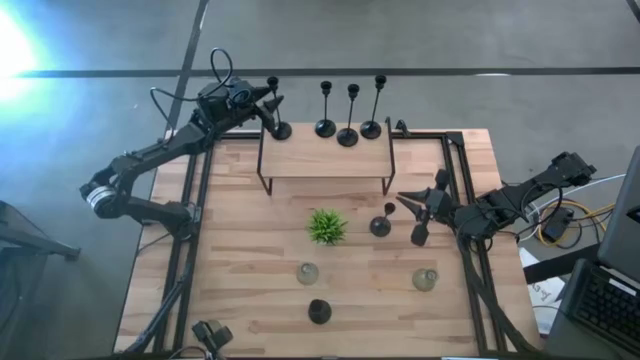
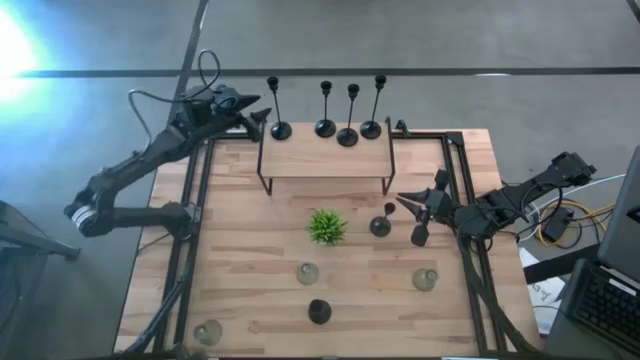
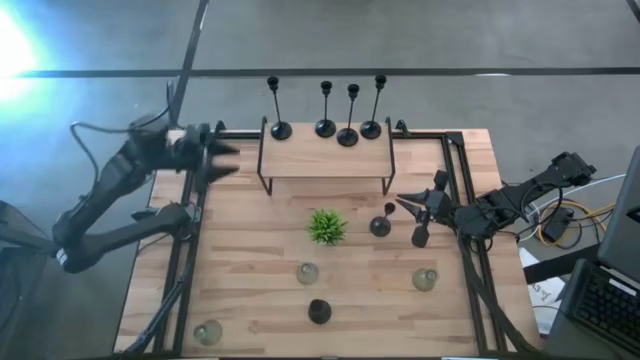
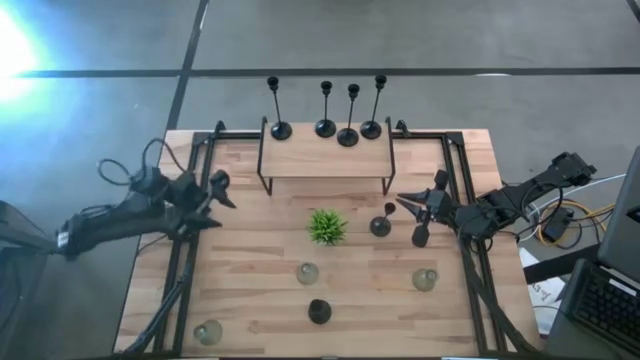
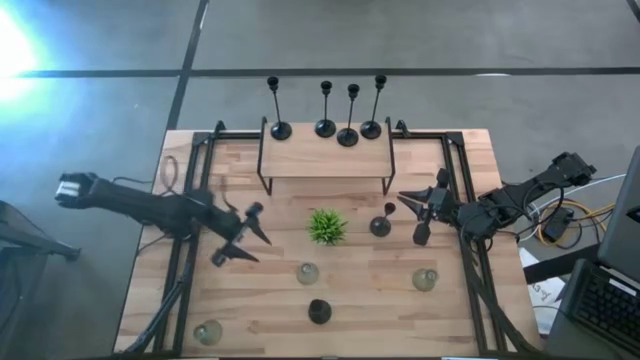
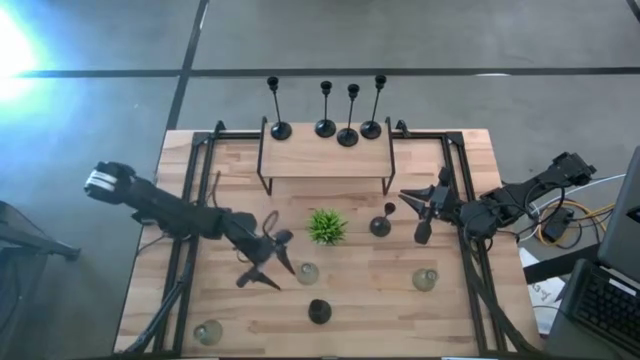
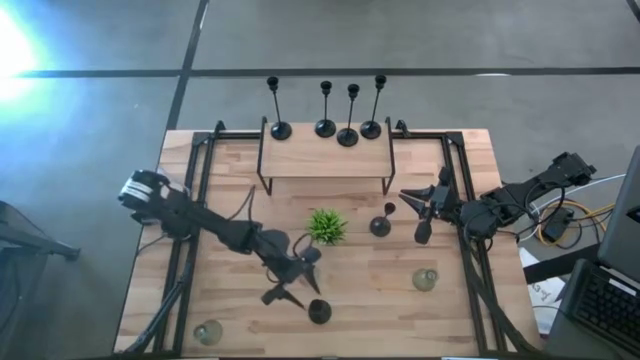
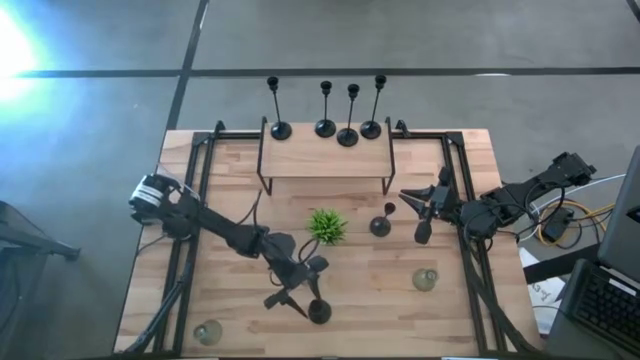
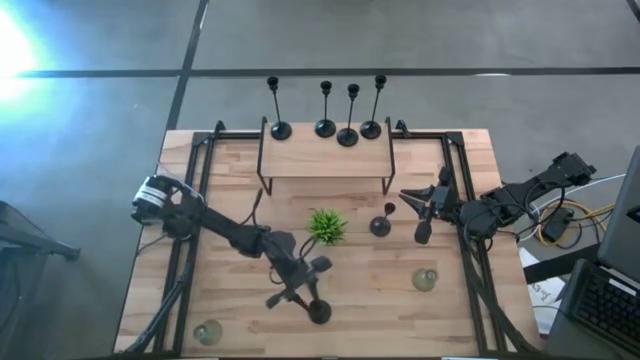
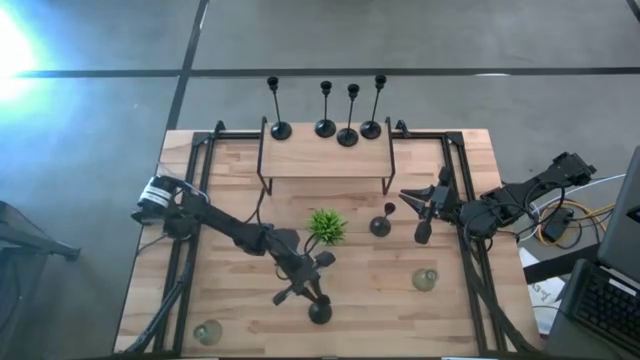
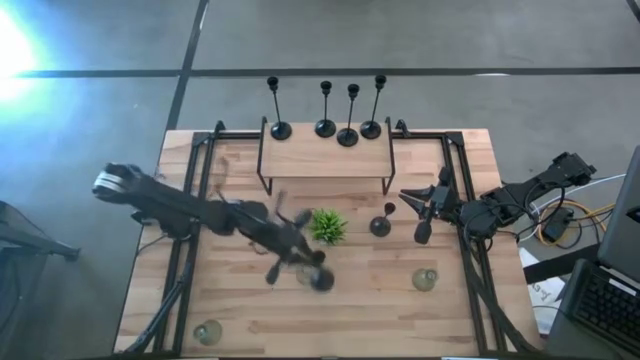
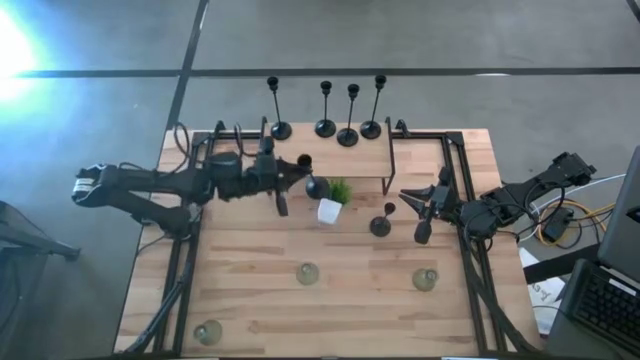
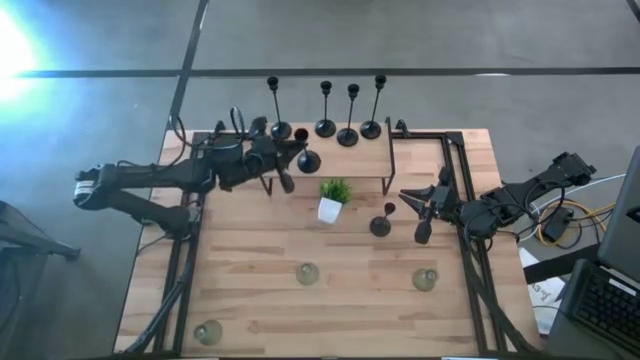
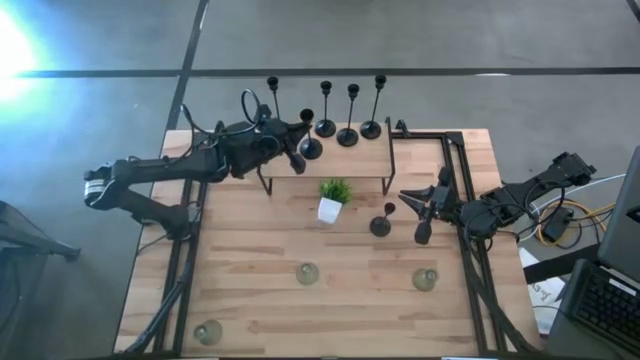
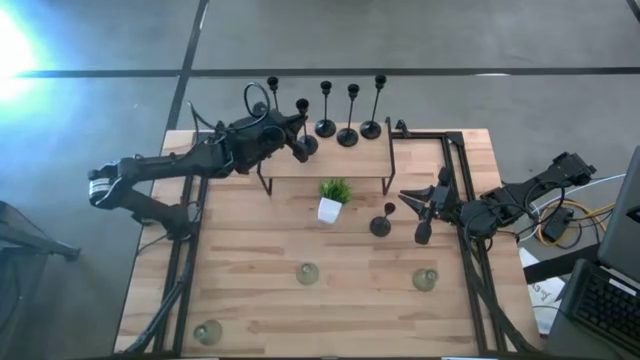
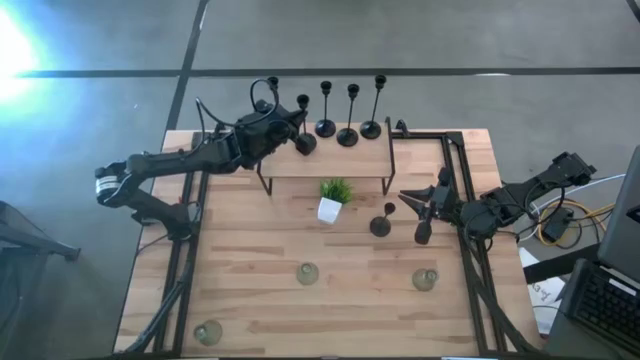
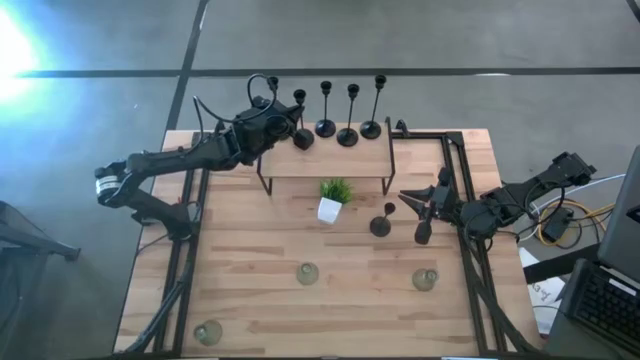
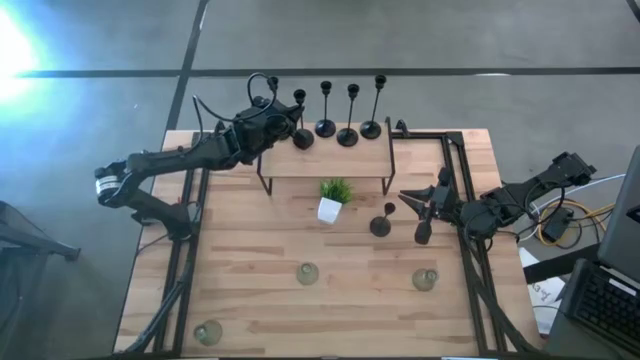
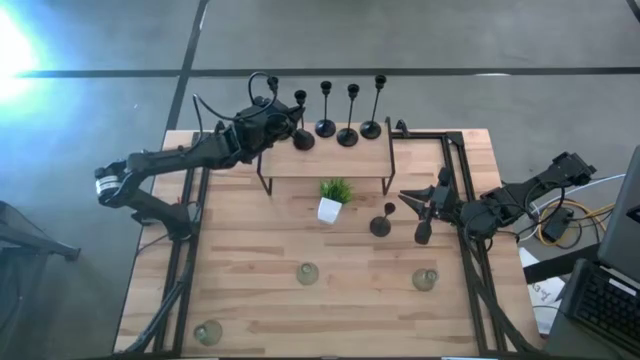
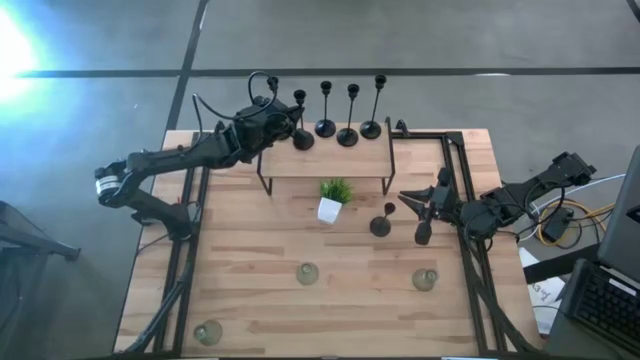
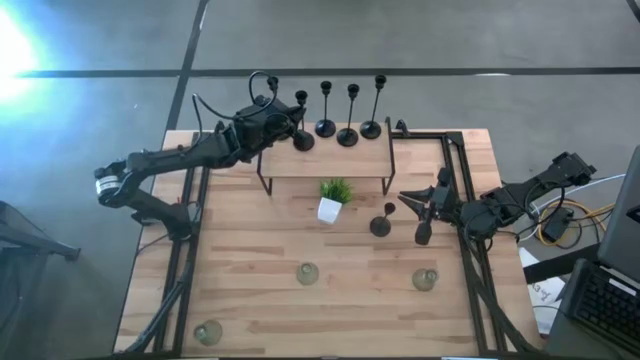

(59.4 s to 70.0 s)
Task: Pick & Place candle stick holders
Put the large black candle holder on the shelf

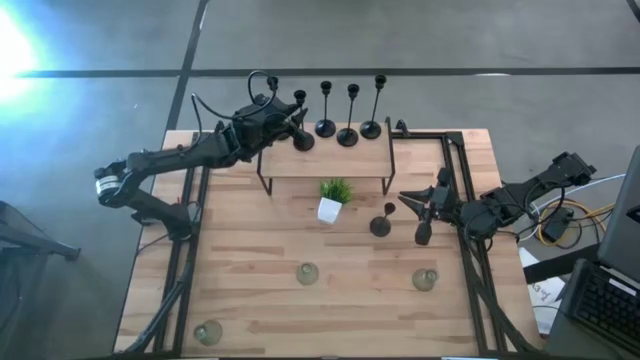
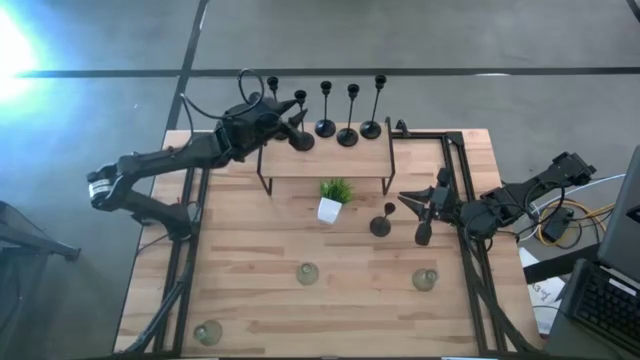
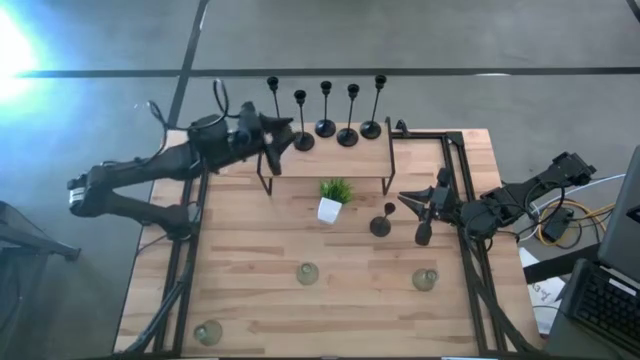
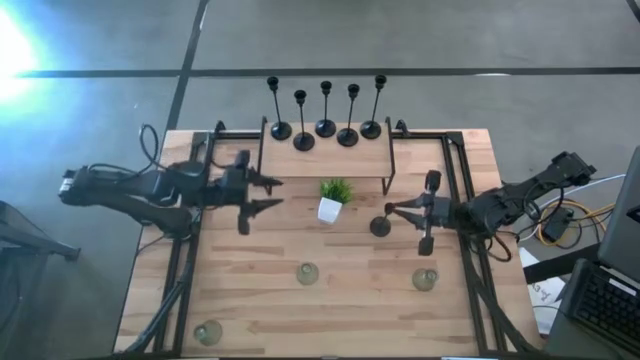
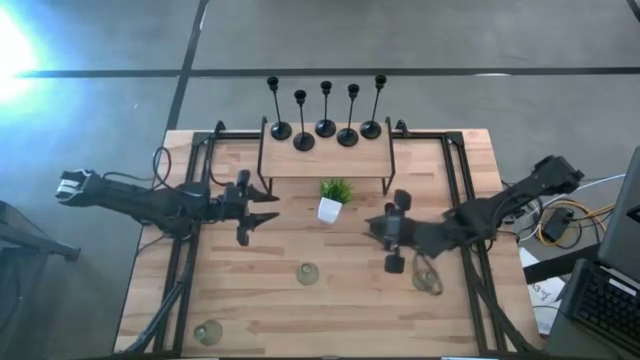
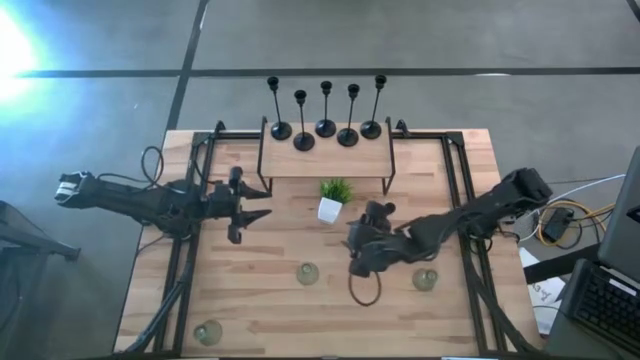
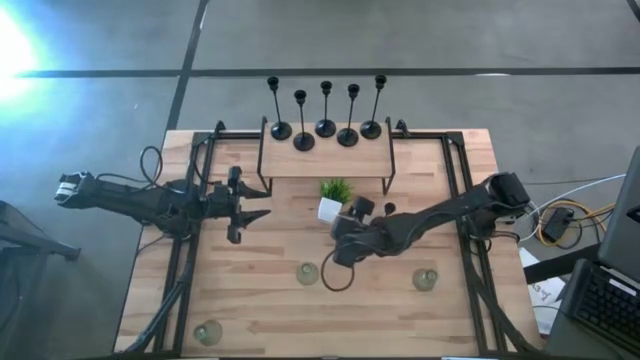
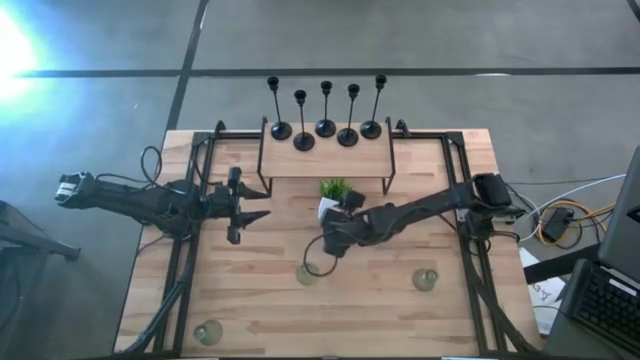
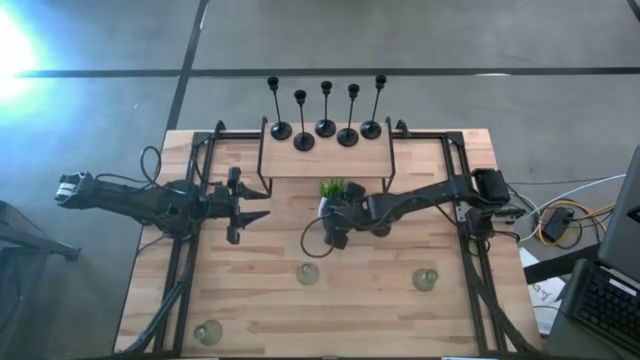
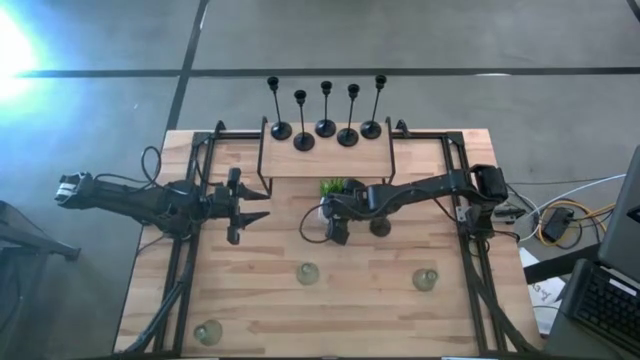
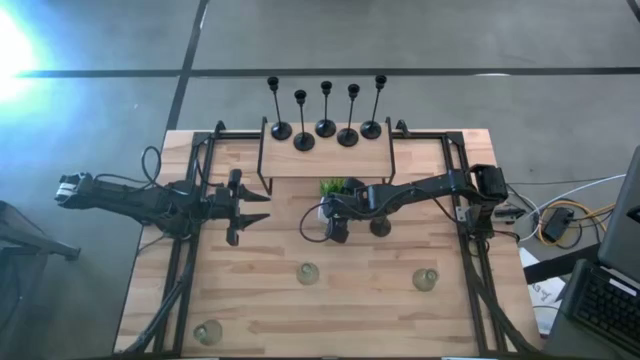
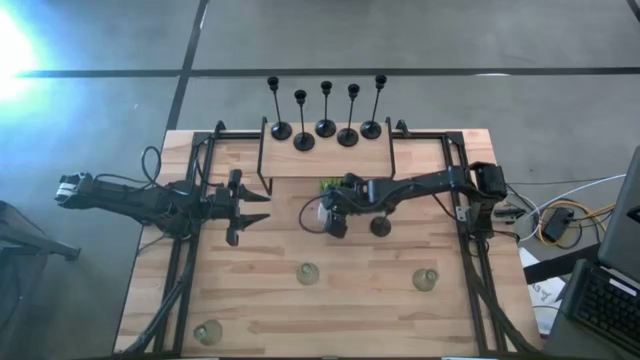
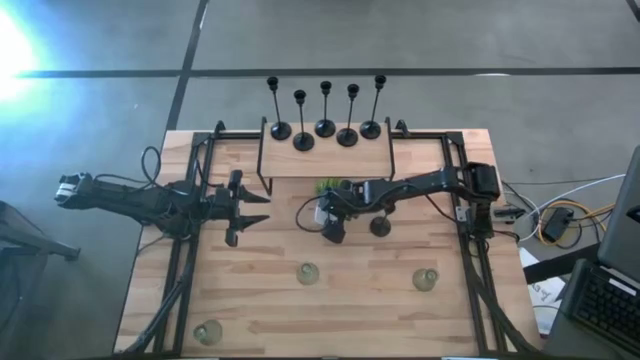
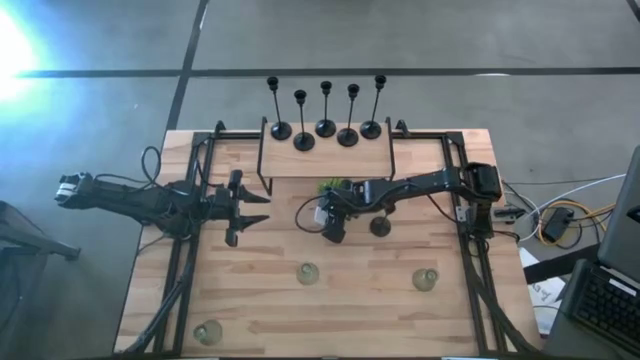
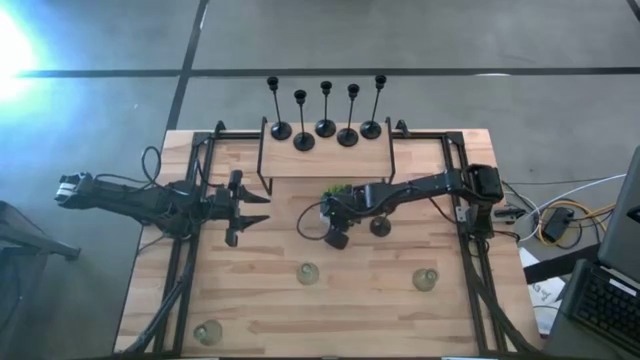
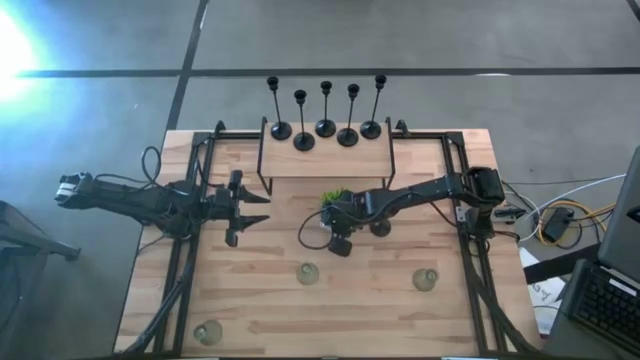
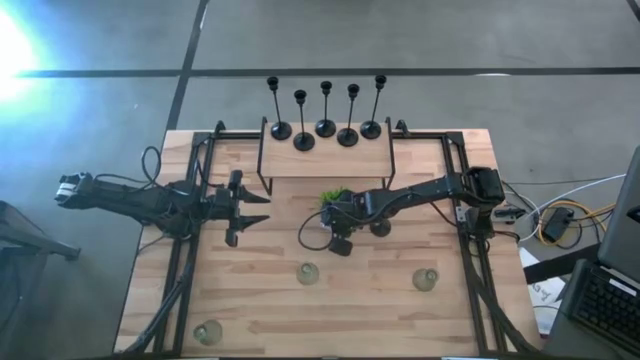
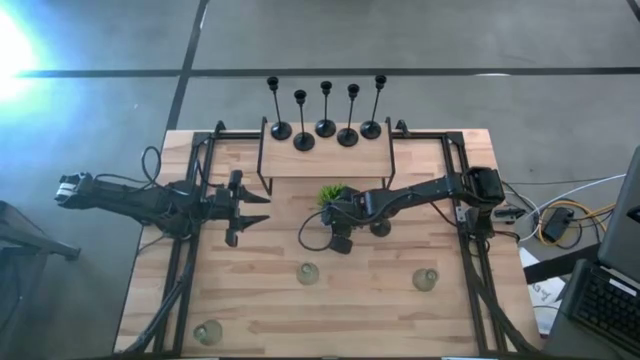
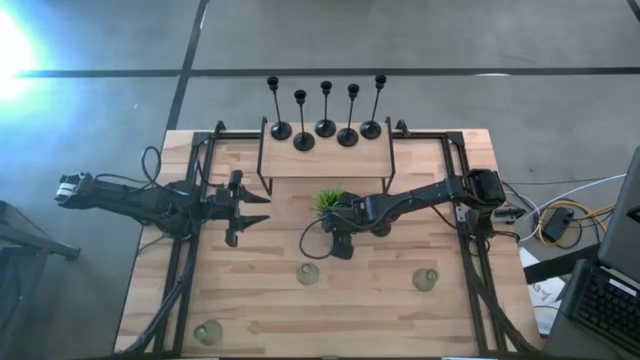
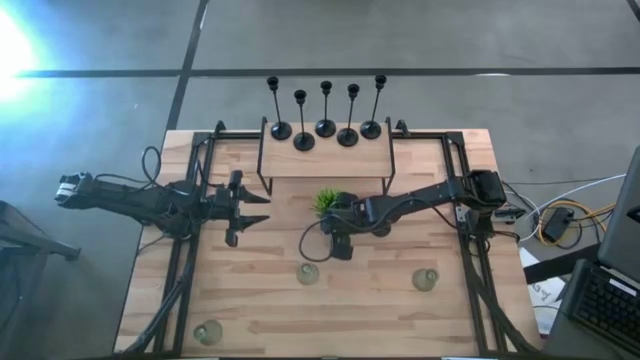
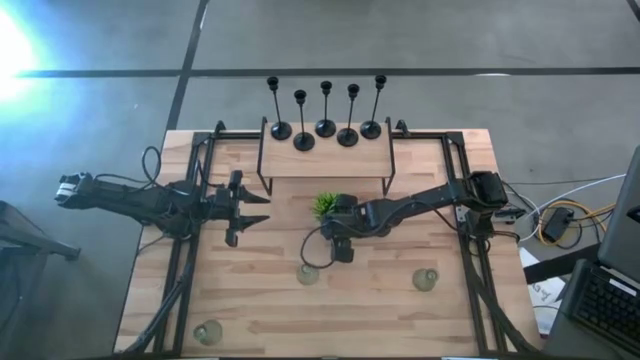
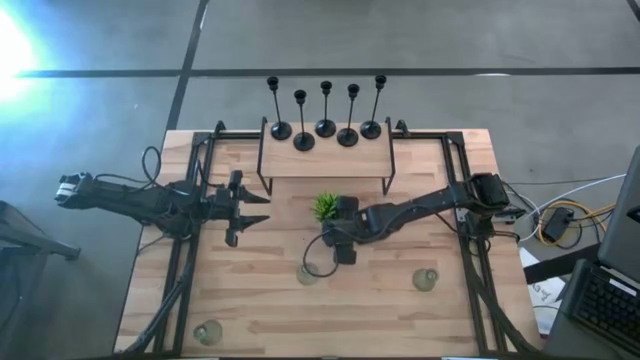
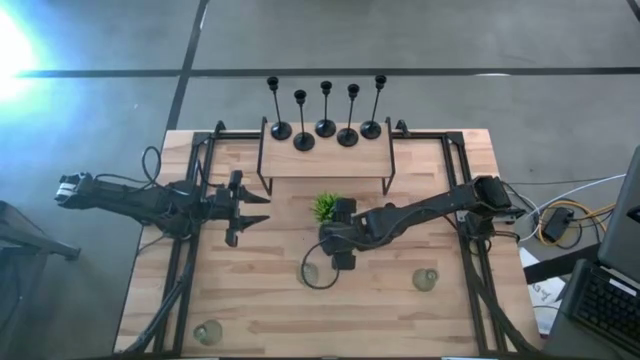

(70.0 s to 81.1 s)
Adjust the white vase
